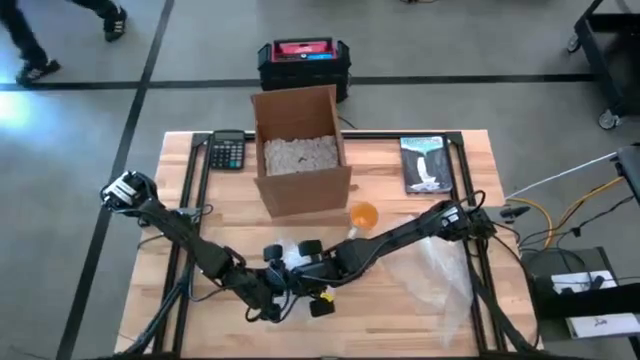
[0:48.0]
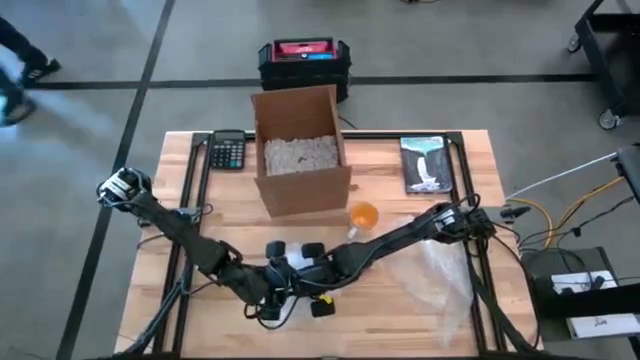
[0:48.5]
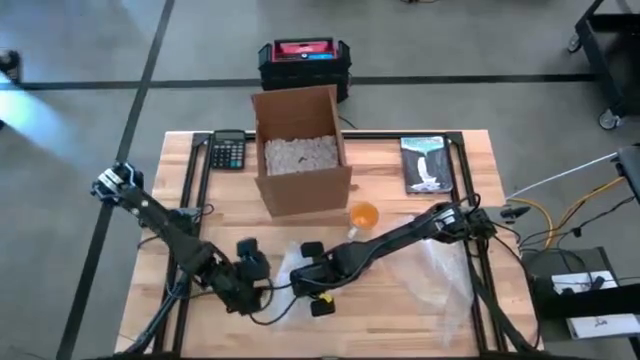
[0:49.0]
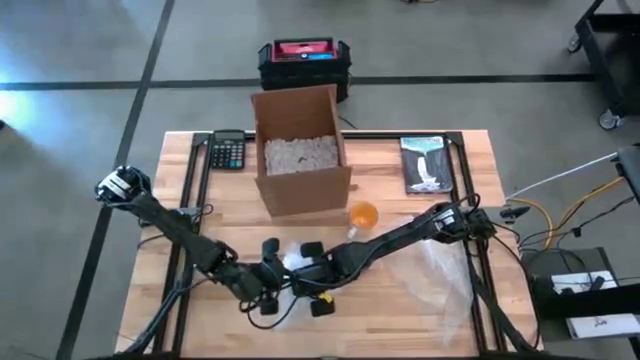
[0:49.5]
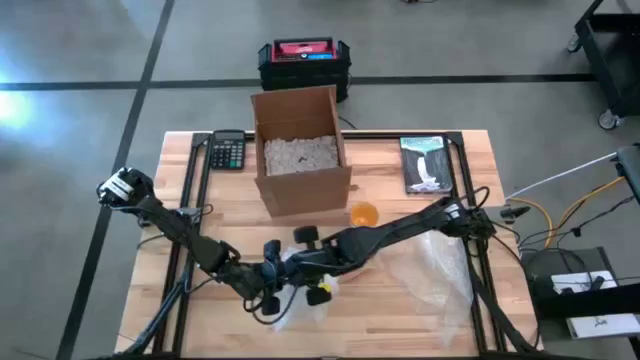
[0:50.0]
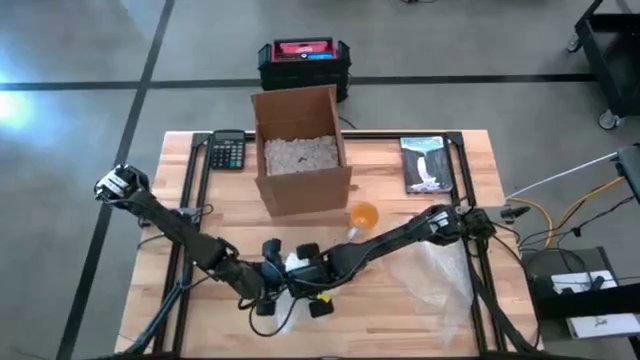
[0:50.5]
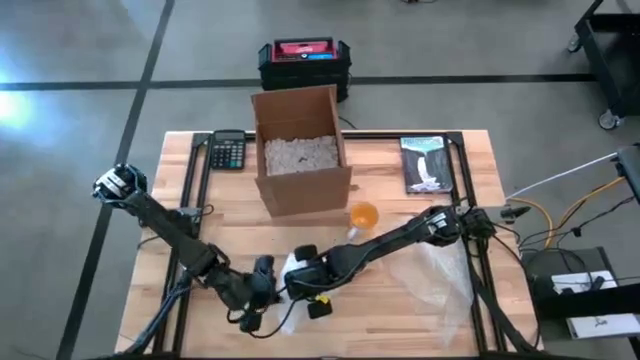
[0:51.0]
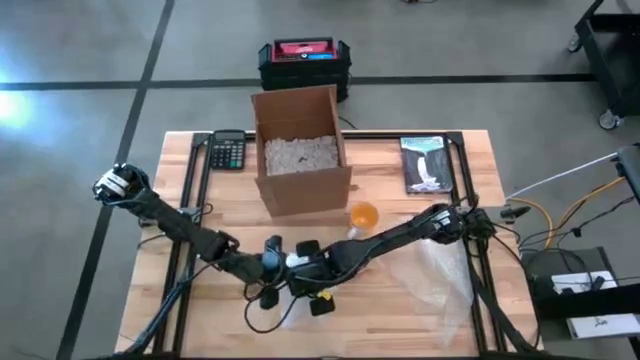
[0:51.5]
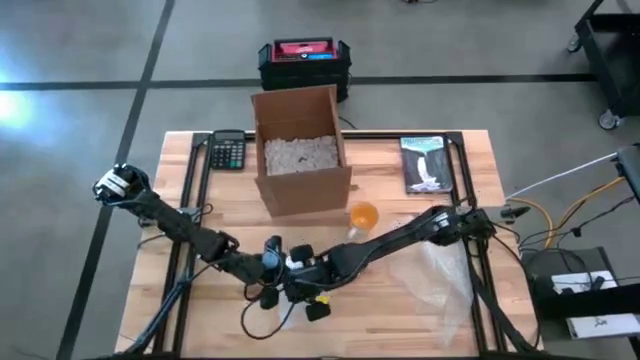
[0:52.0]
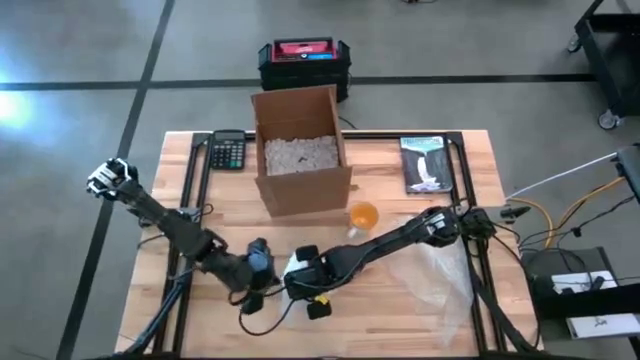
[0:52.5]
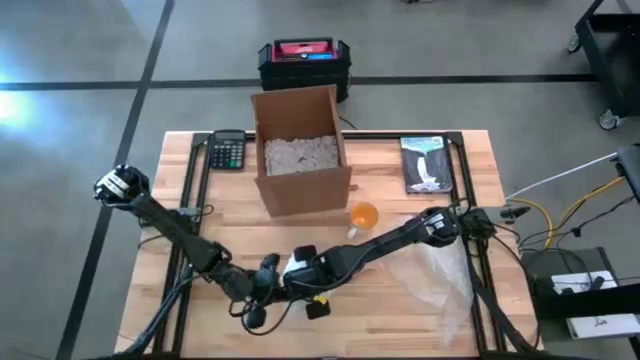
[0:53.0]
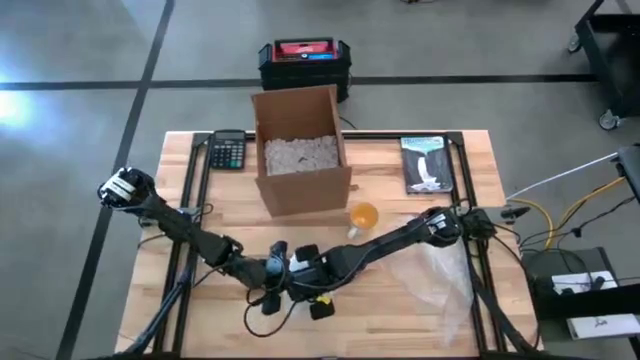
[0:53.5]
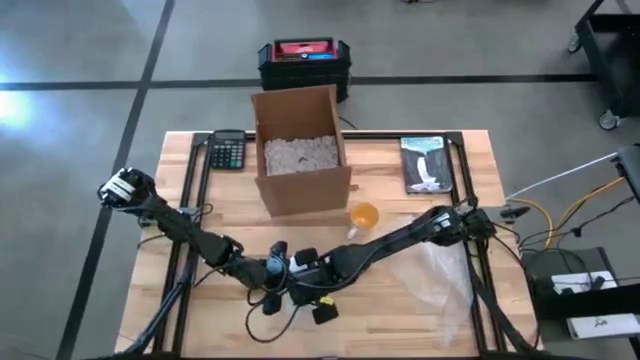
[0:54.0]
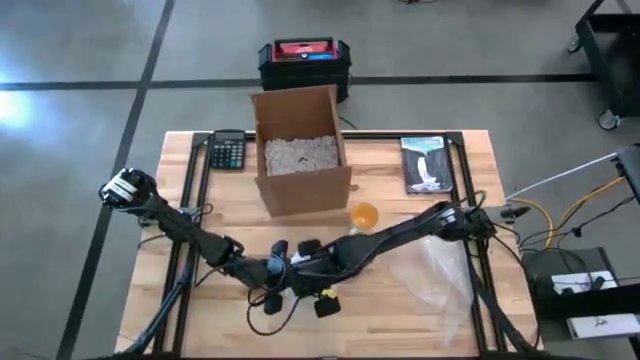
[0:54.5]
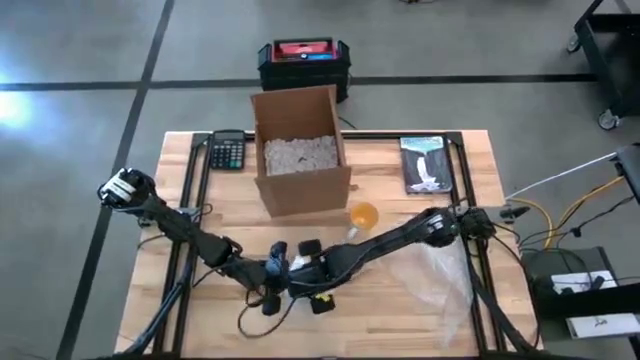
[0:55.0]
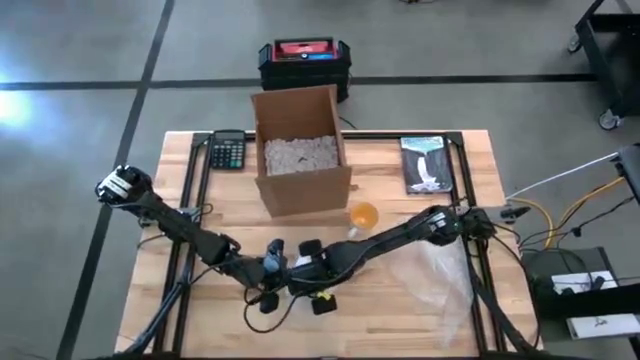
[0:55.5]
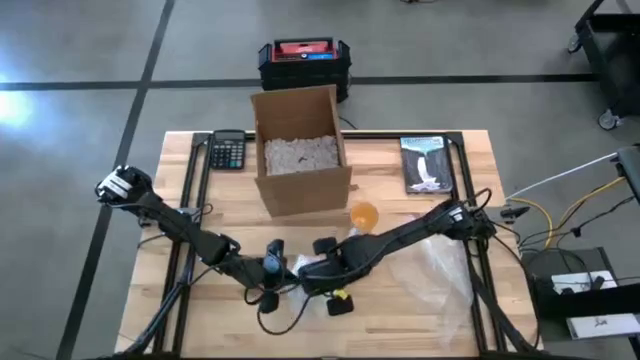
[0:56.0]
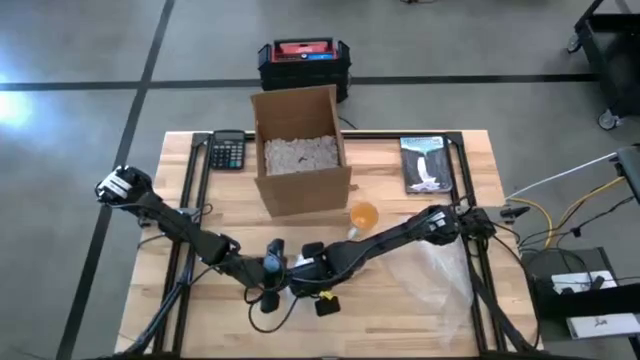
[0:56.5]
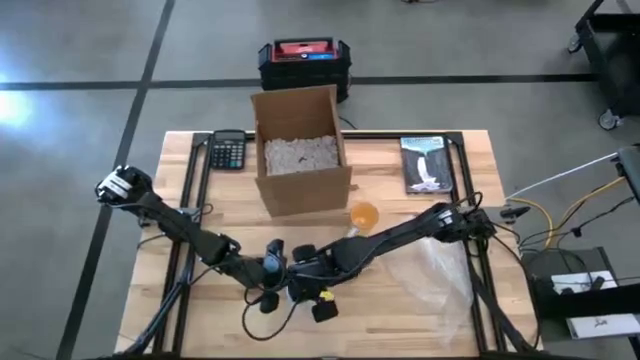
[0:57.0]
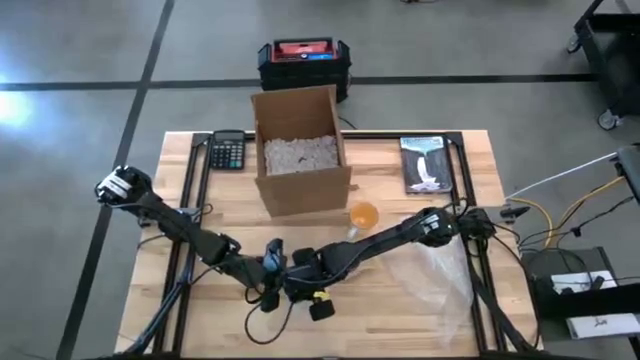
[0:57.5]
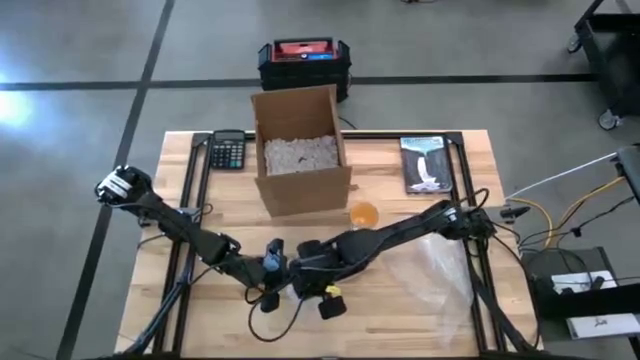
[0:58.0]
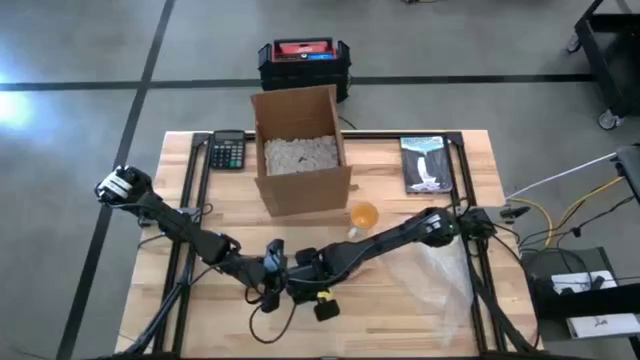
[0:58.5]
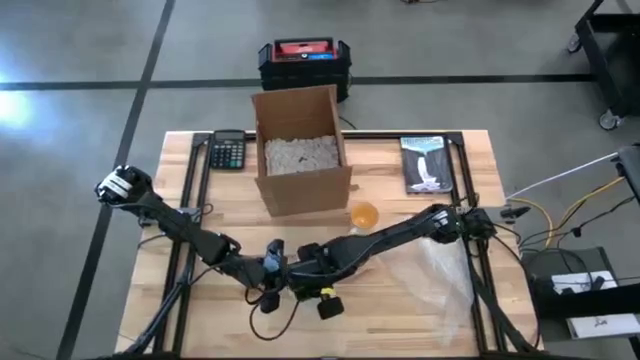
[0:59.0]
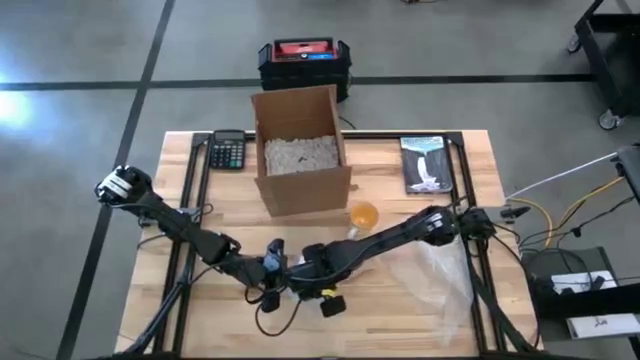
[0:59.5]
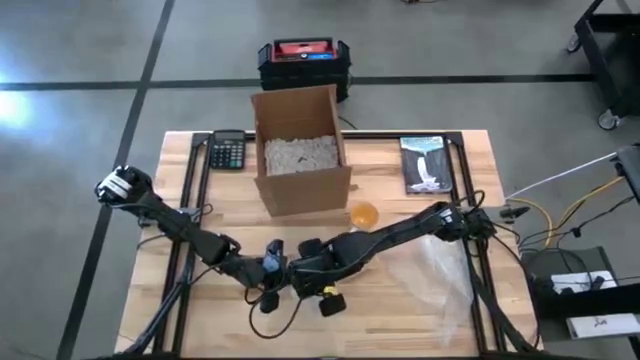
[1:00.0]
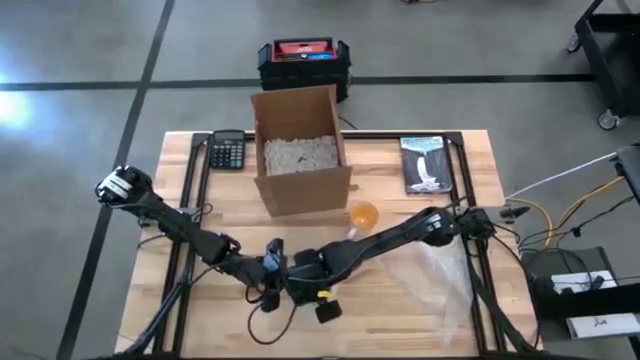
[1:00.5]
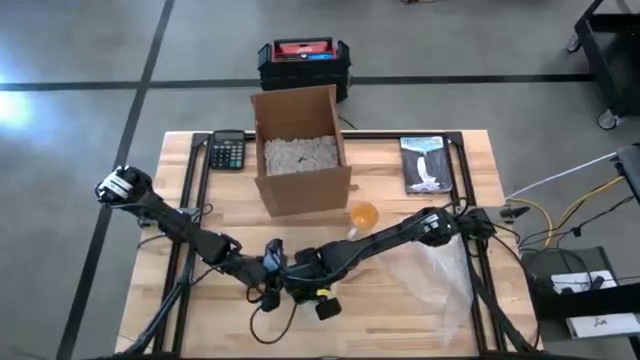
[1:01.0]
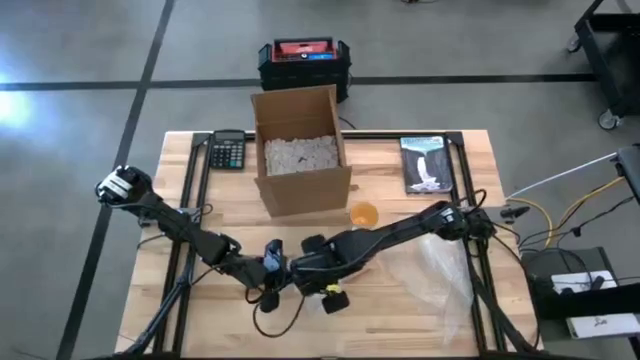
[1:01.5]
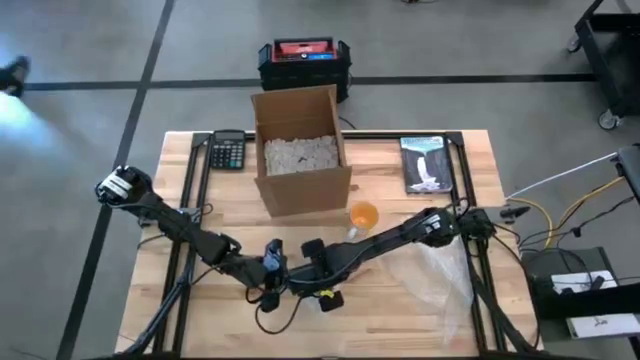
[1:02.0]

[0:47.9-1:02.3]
Task: wrap mug
Wrap the blue mug with the transparent bubble wrap

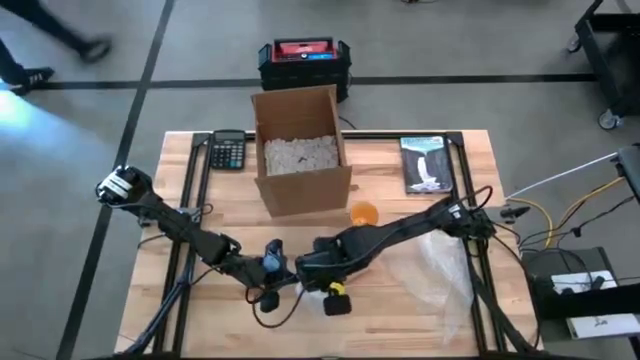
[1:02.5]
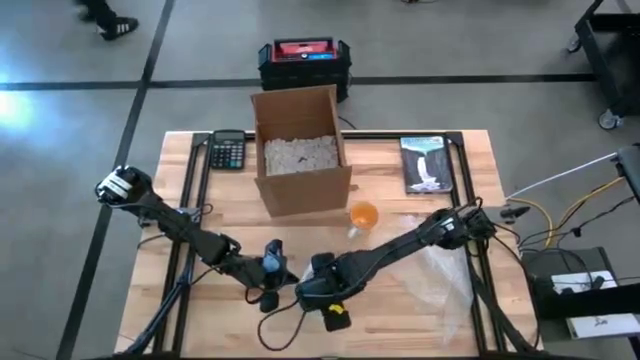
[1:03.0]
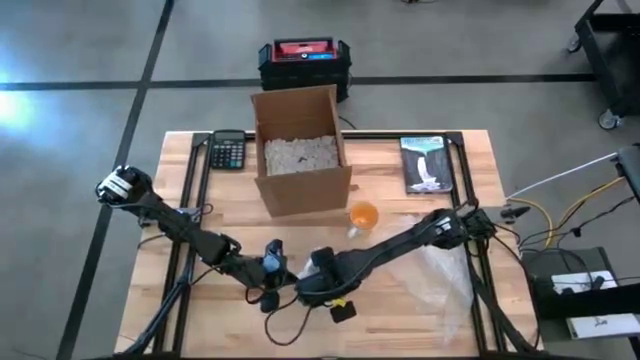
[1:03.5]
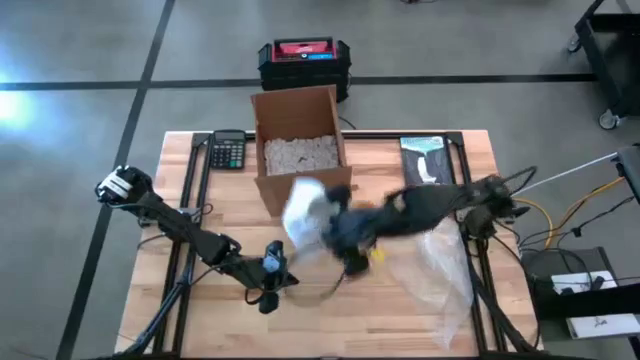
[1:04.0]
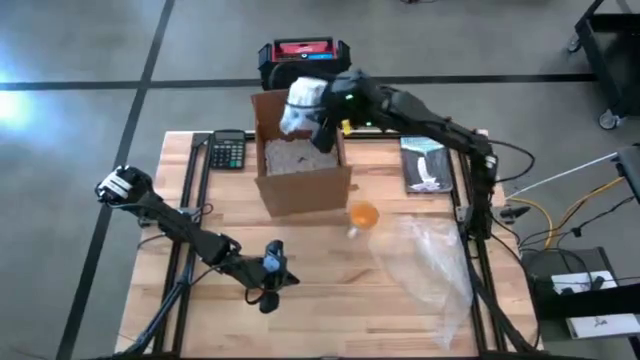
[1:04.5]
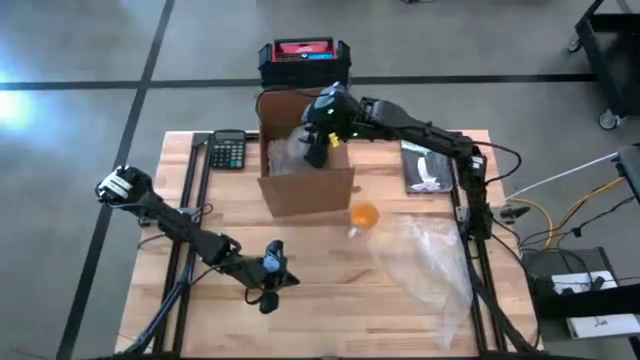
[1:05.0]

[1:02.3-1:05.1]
Put the wrapped blue mug into the brown cardboard box

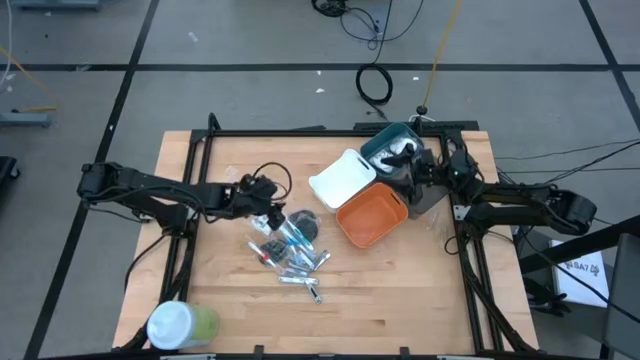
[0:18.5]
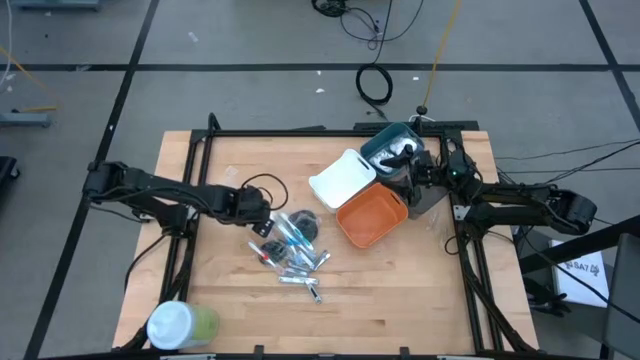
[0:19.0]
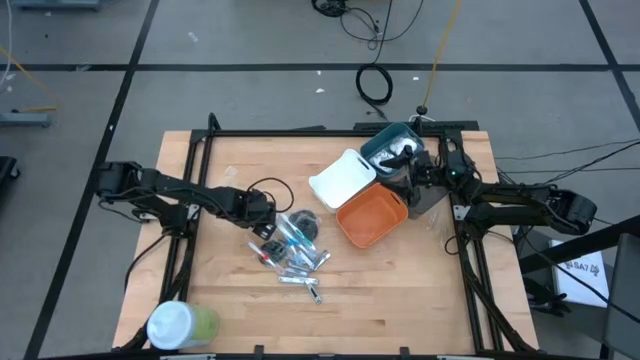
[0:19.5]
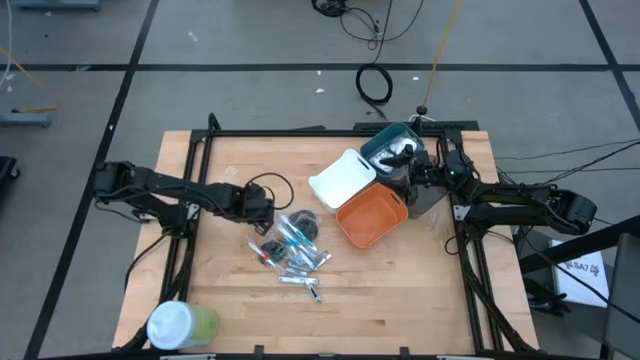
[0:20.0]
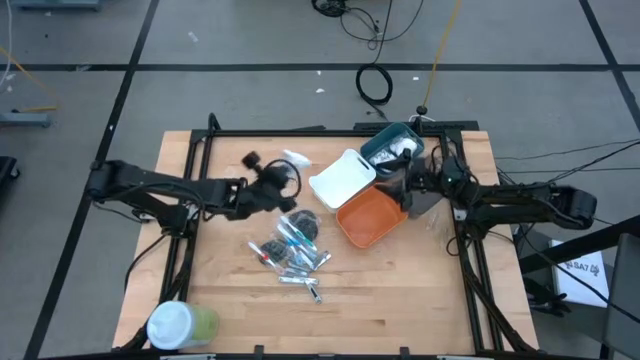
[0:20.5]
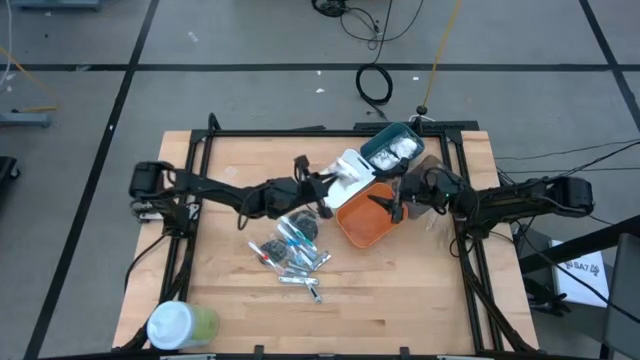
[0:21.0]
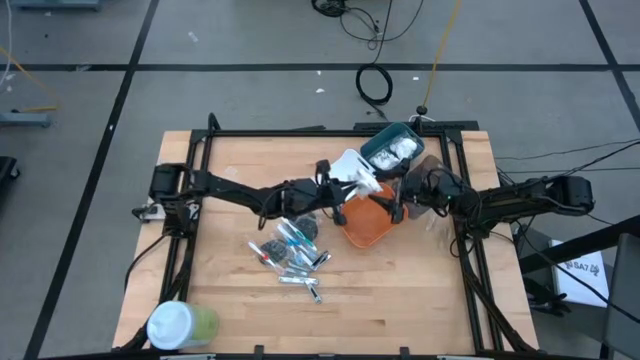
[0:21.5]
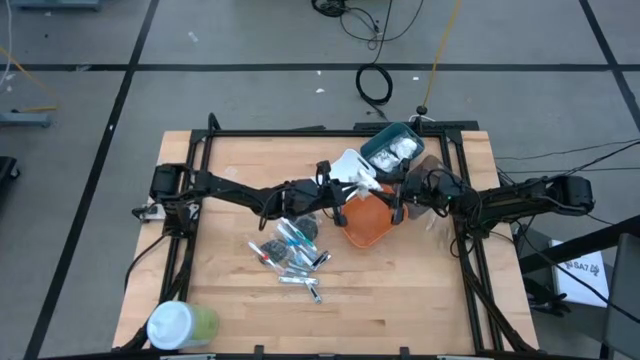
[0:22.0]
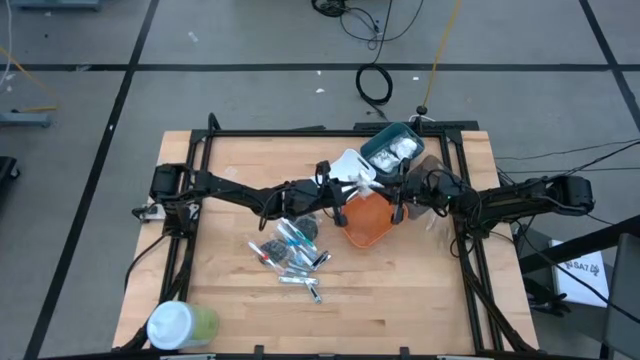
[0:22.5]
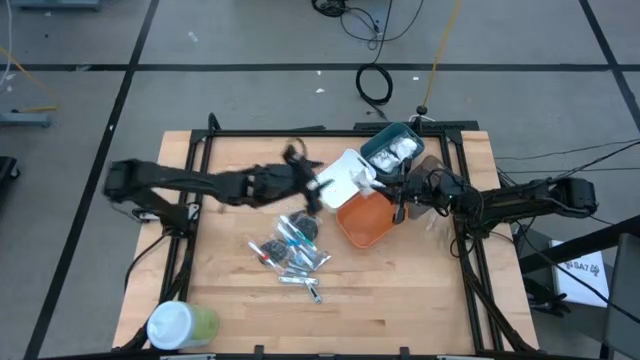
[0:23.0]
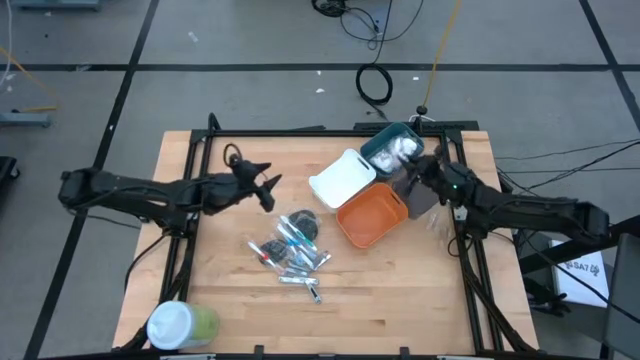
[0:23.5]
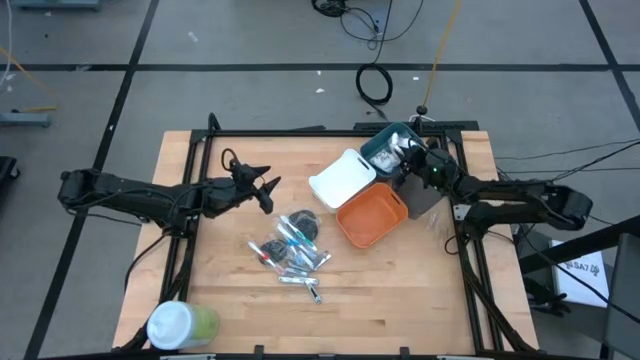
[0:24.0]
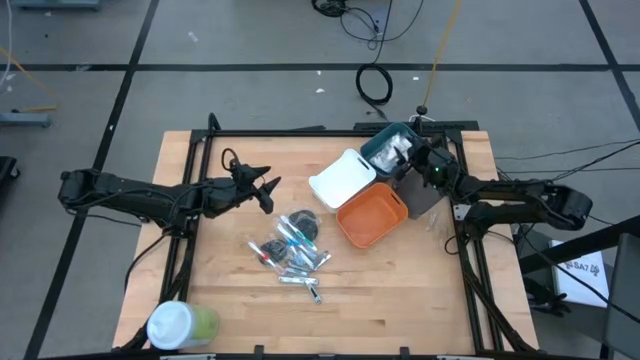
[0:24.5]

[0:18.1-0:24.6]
Task: Pick & Place Travel size toiletries
Put the white cotton pack into the blue bin
